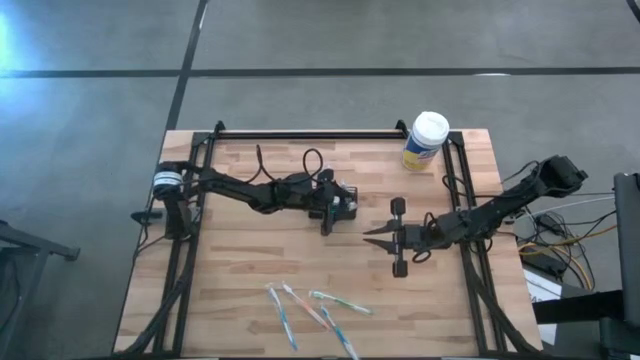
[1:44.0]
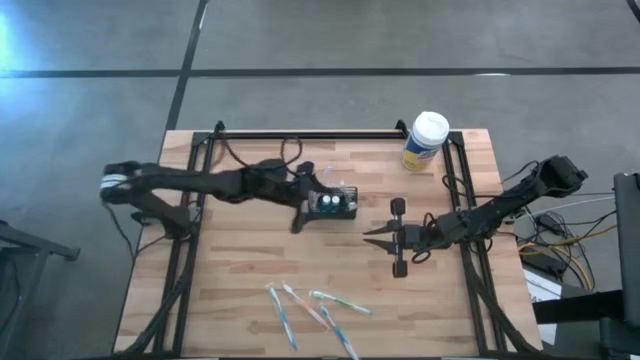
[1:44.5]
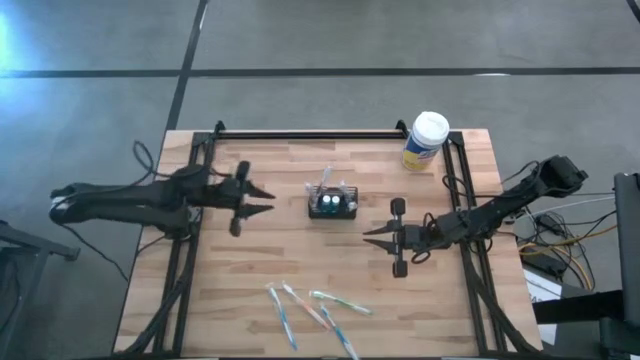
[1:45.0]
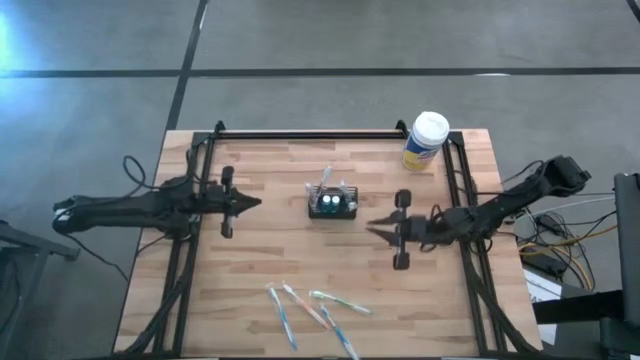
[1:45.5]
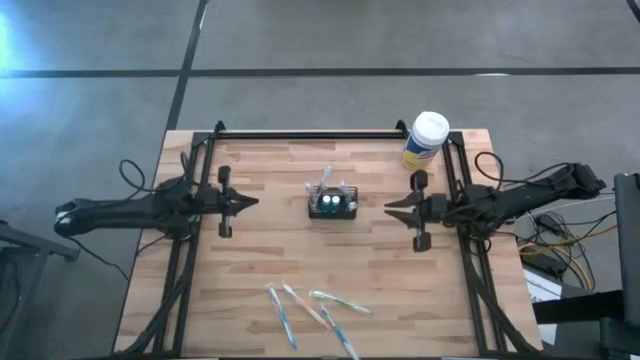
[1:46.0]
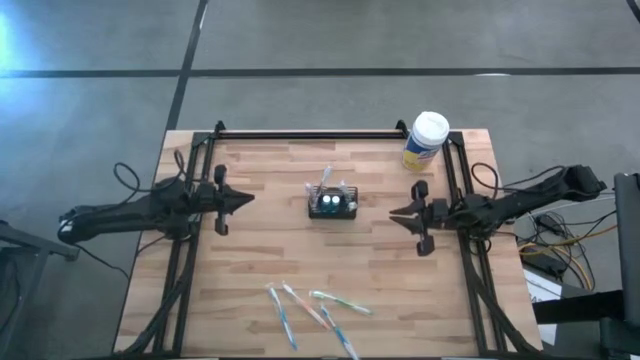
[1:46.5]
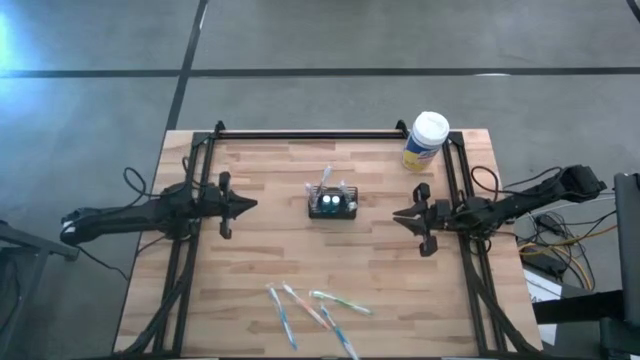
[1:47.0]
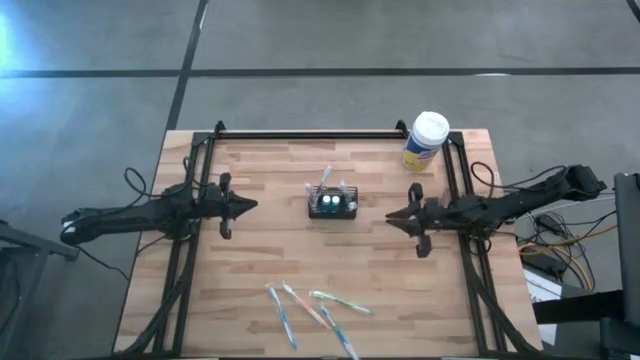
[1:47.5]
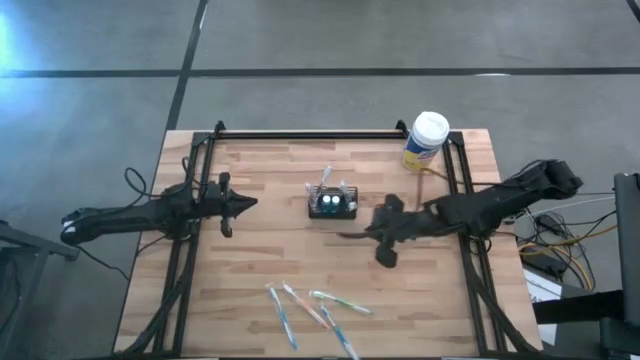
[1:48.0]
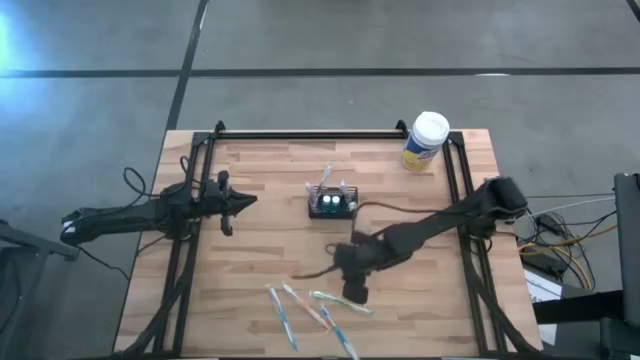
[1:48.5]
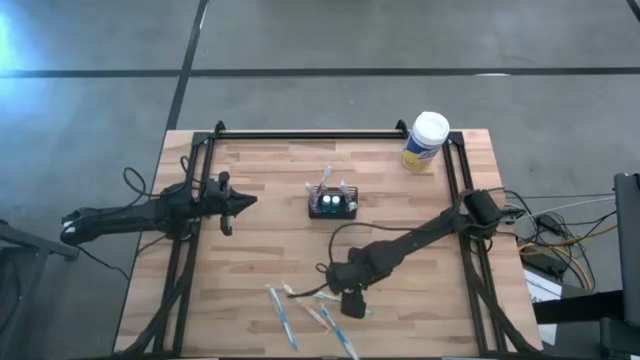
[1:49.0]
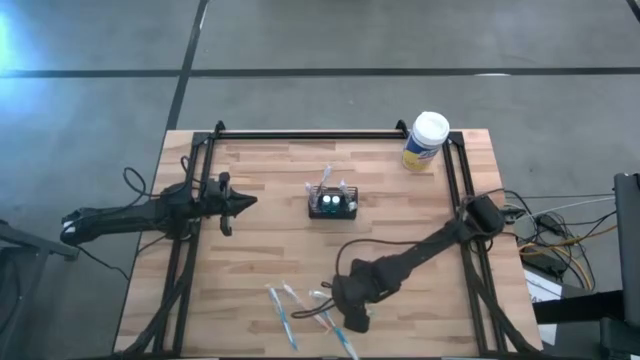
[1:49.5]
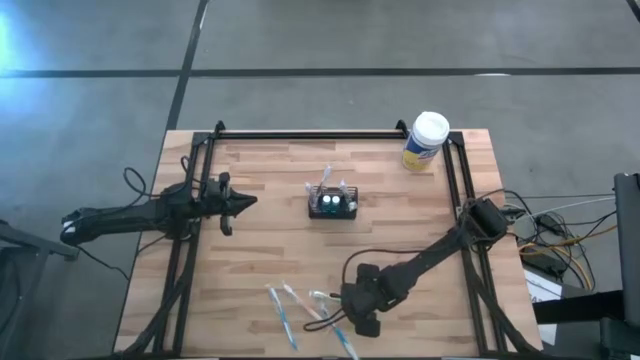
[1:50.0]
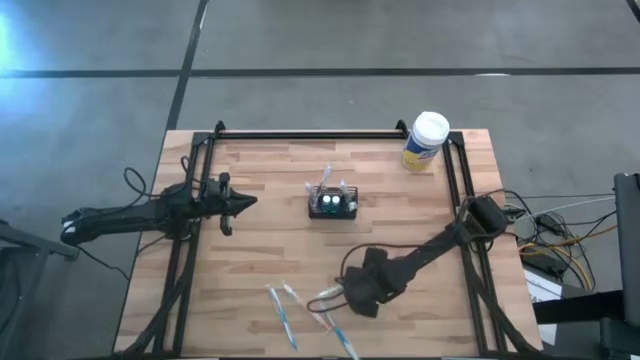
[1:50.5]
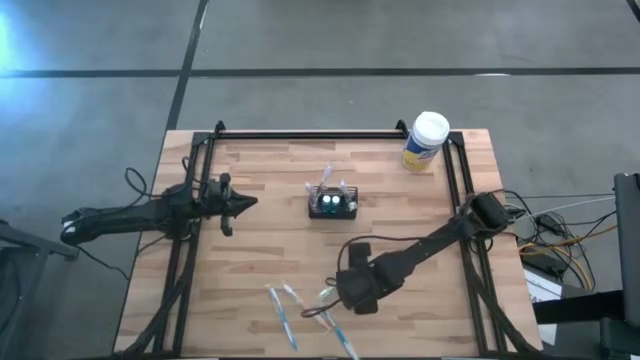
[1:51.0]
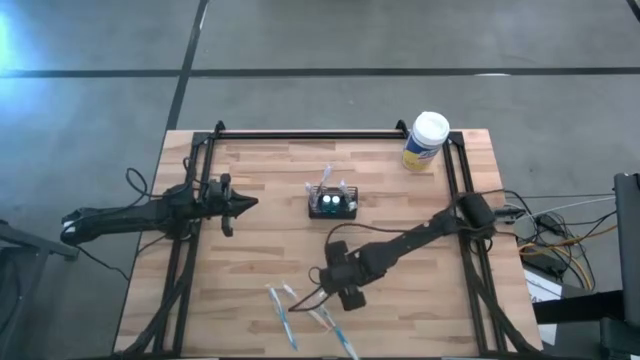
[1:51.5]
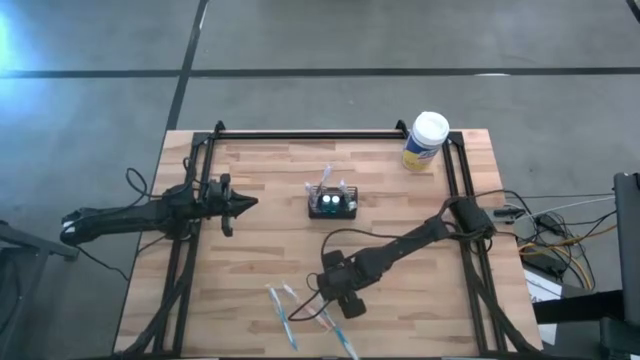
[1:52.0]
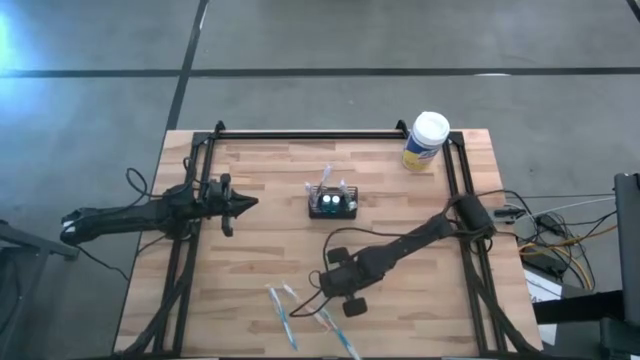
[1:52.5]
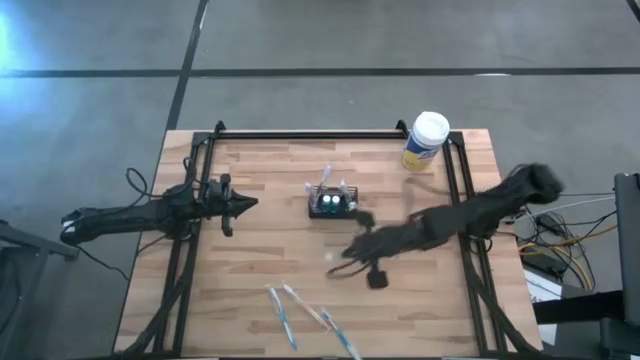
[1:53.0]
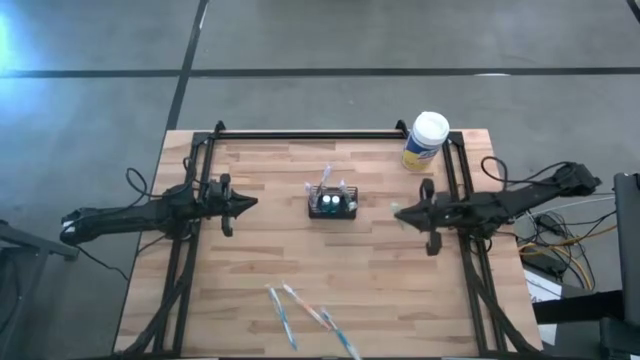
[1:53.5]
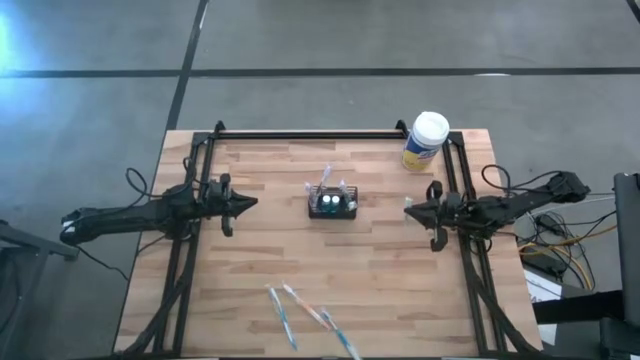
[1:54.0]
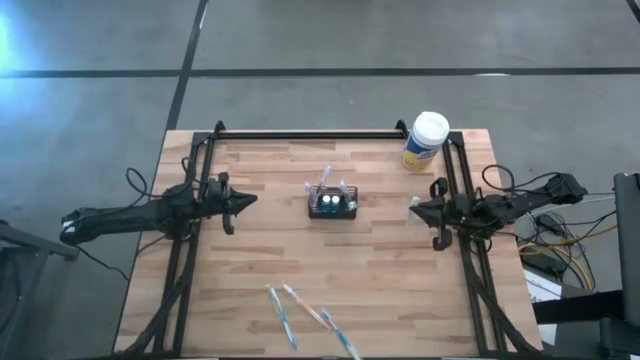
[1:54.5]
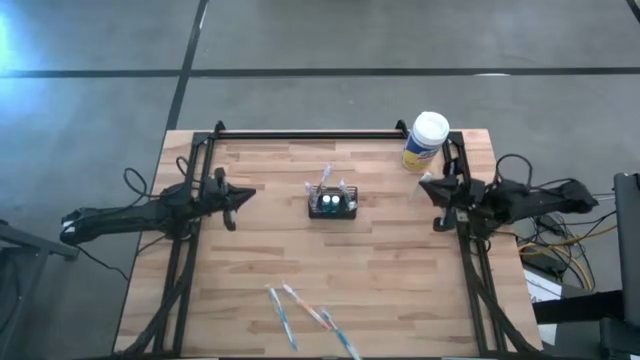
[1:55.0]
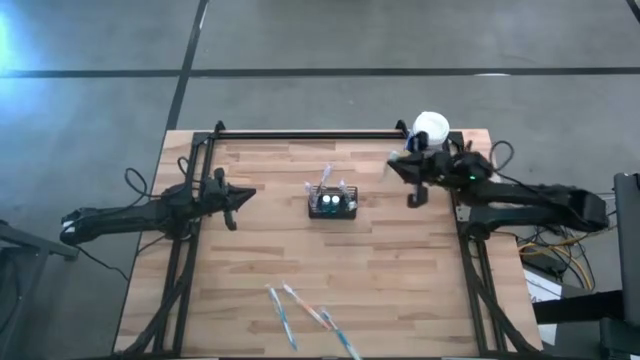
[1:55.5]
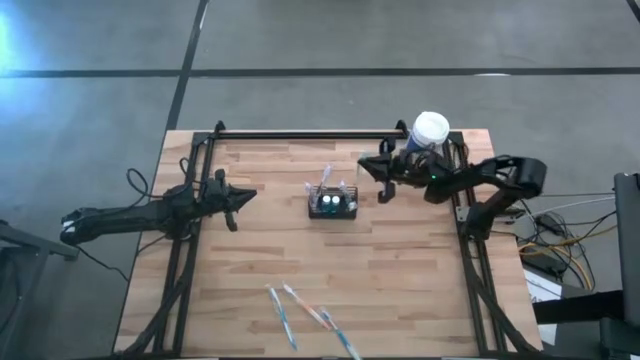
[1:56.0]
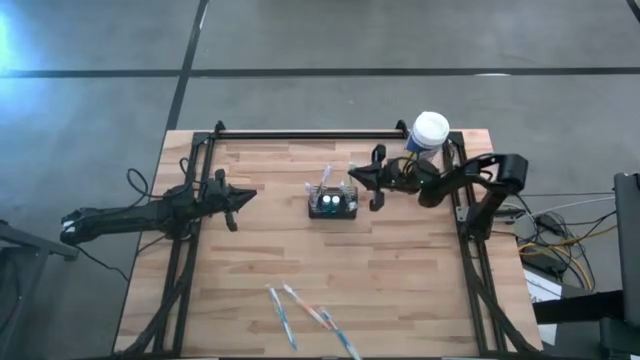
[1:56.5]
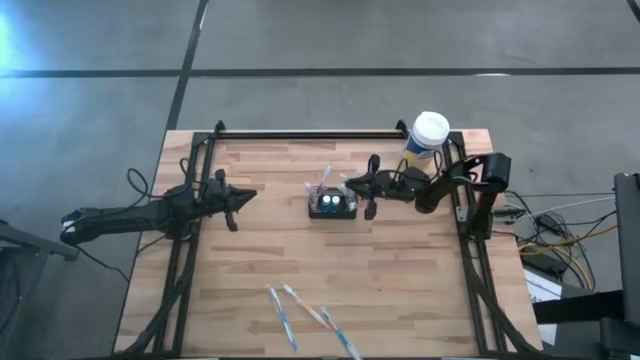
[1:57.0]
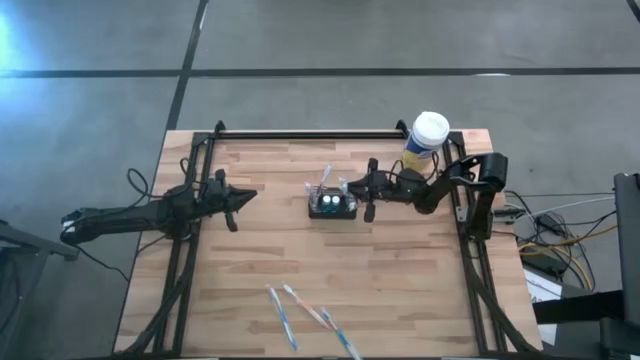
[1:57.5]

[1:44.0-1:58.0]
Task: Pick & Place toothbrushing station
Put the green toothbrush into the black organizer

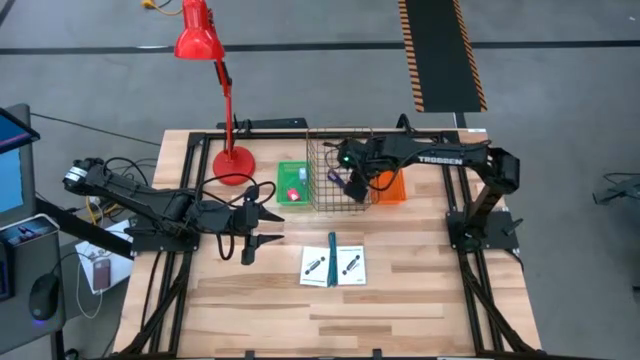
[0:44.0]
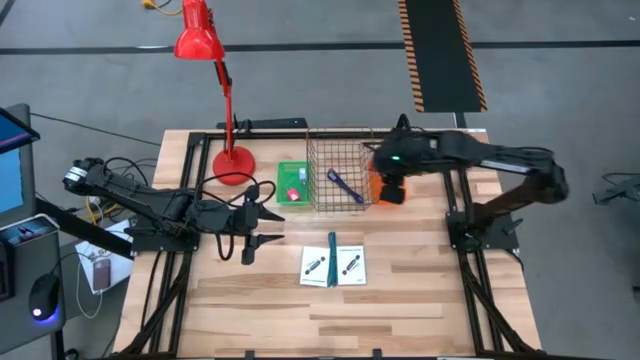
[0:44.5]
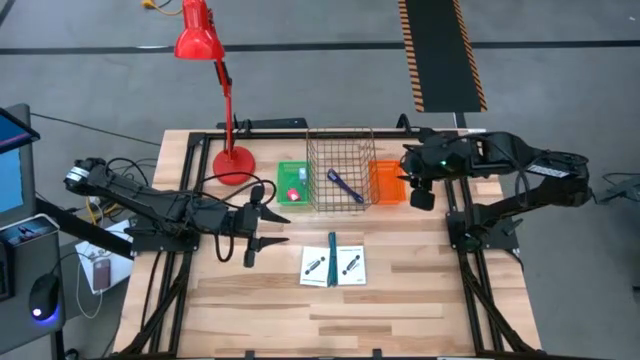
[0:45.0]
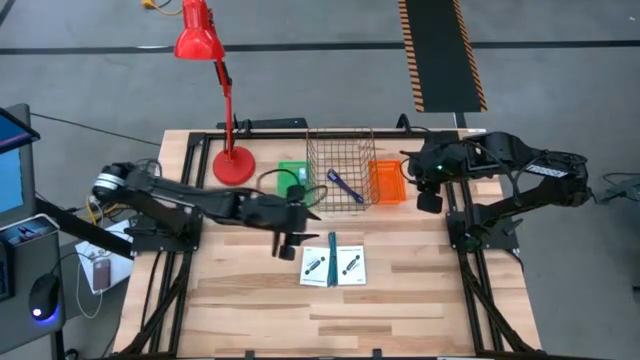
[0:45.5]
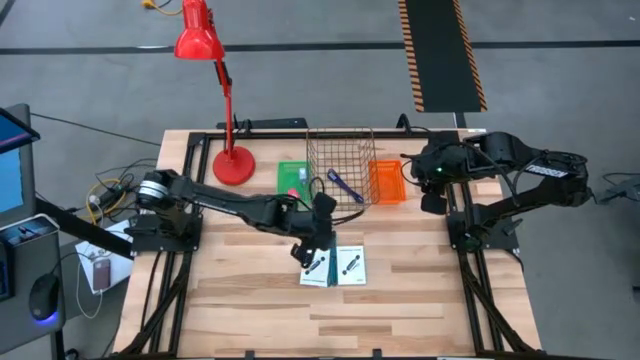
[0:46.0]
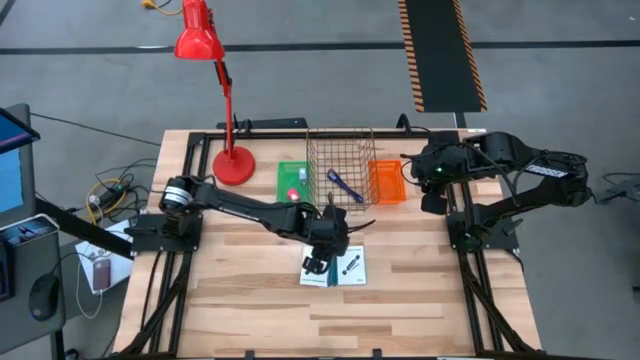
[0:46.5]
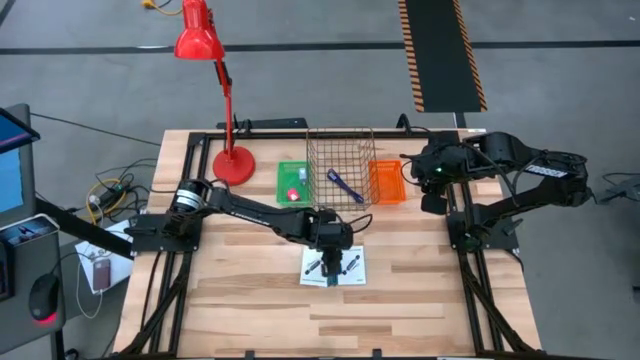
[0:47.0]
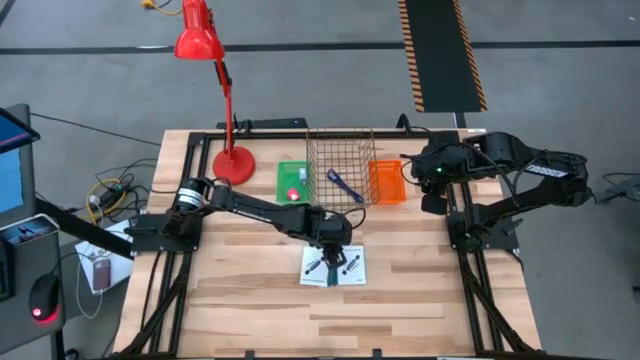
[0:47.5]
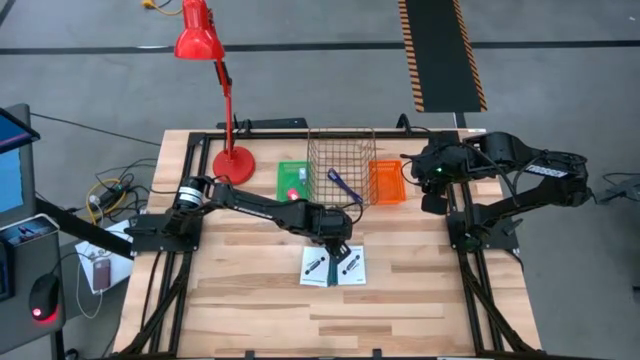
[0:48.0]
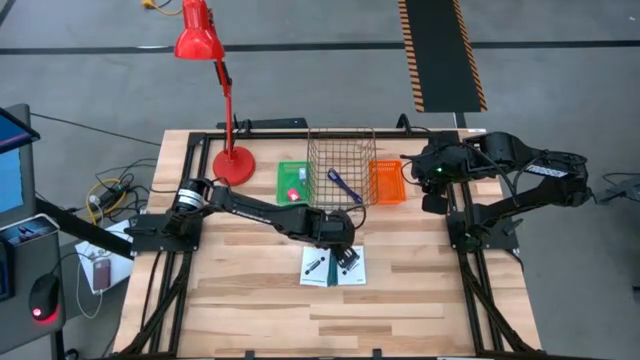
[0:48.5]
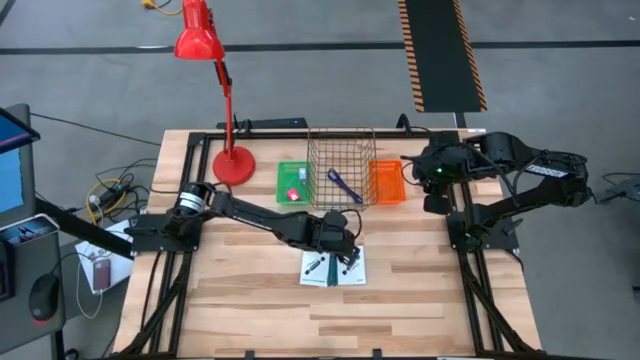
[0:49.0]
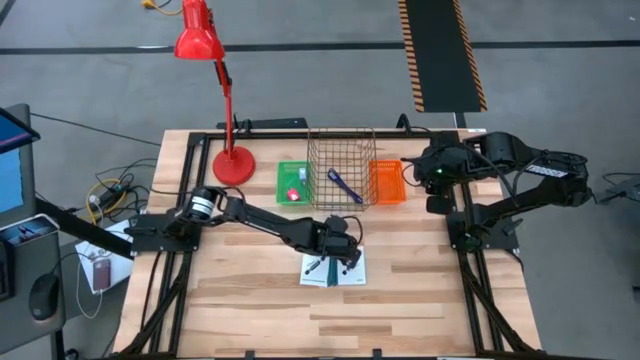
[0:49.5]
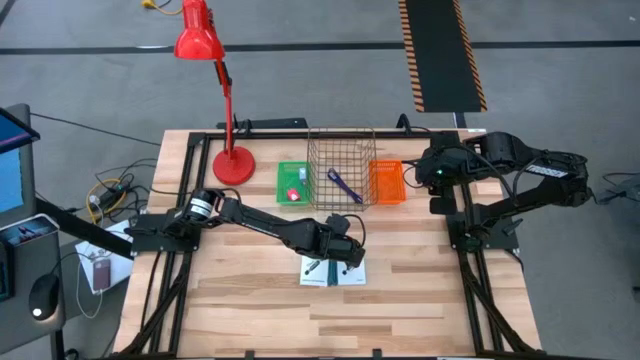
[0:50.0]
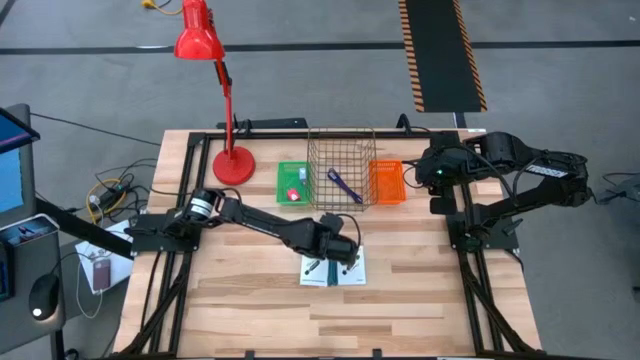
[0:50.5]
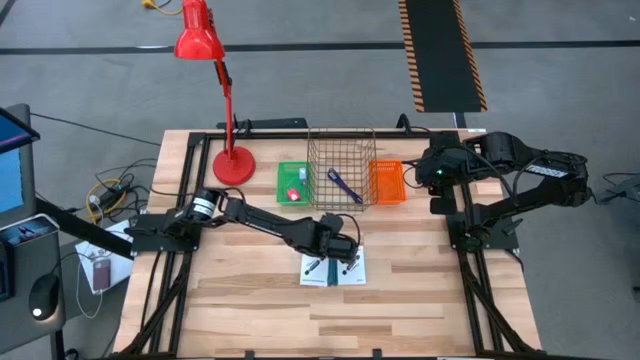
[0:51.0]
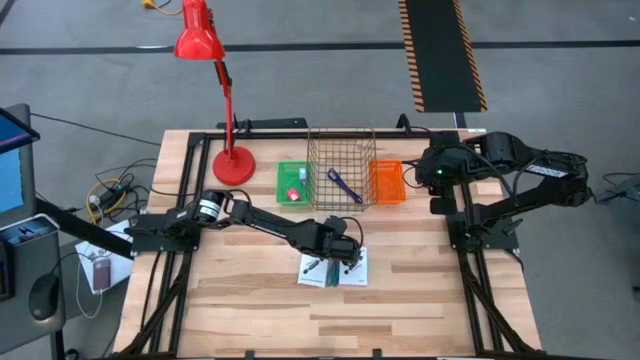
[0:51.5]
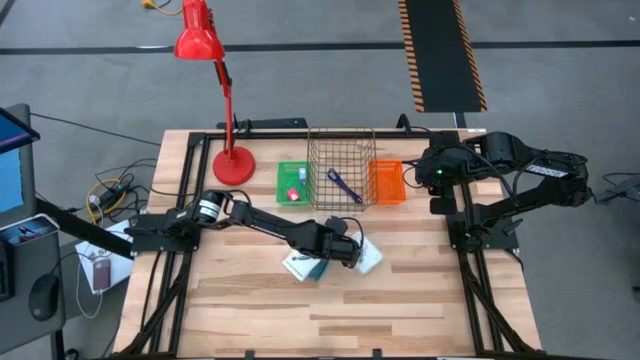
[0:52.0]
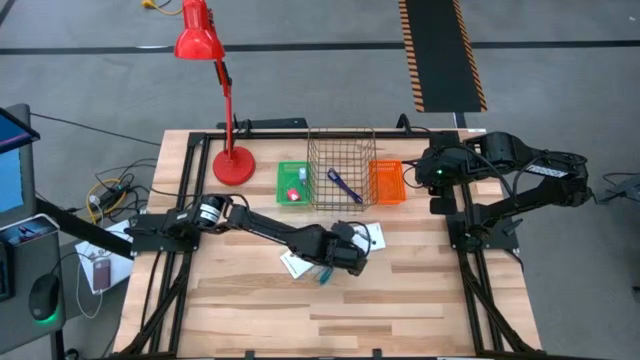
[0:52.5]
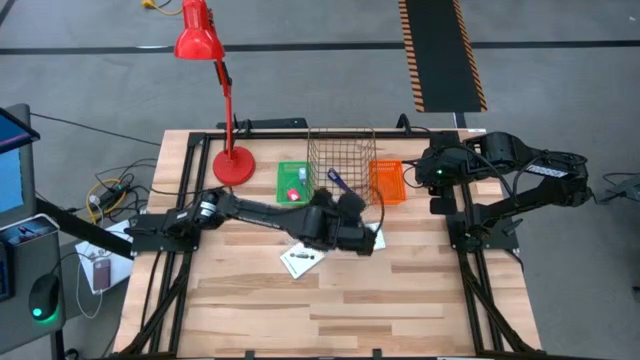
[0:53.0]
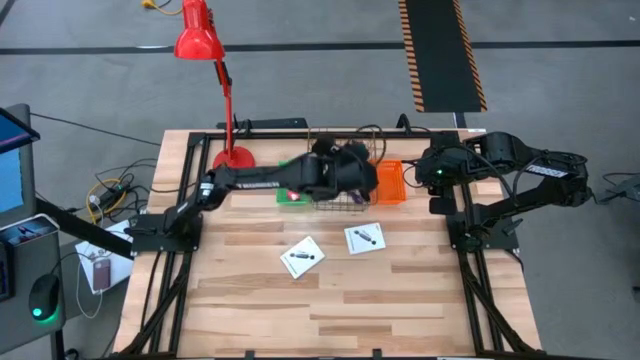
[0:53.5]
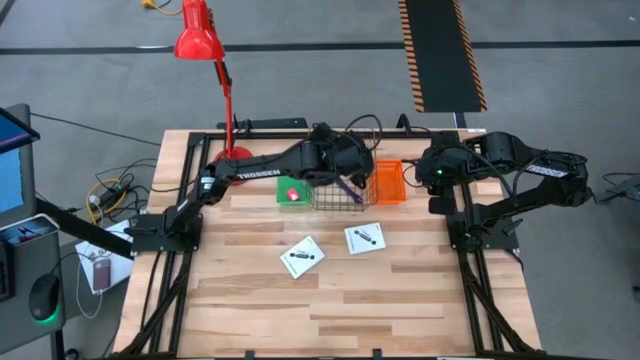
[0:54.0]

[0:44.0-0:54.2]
Task: Pick and place items into bin
Put the blue charger cable into the gold wire bin
